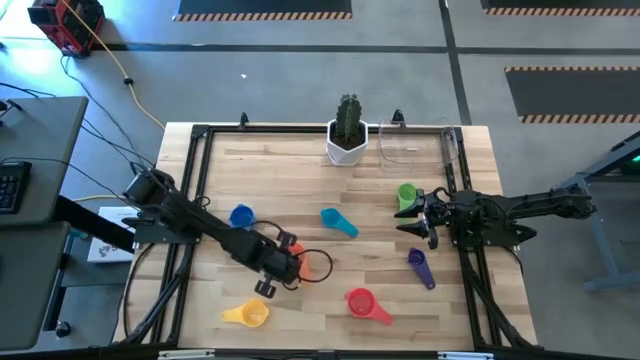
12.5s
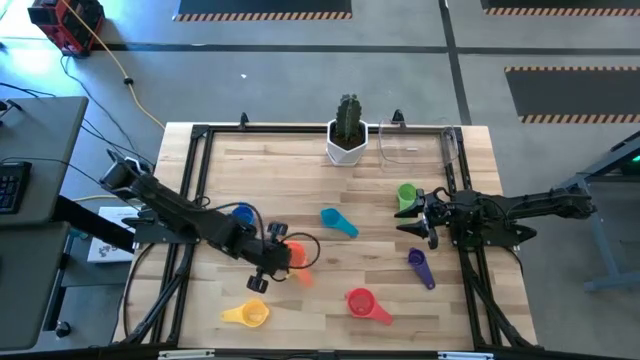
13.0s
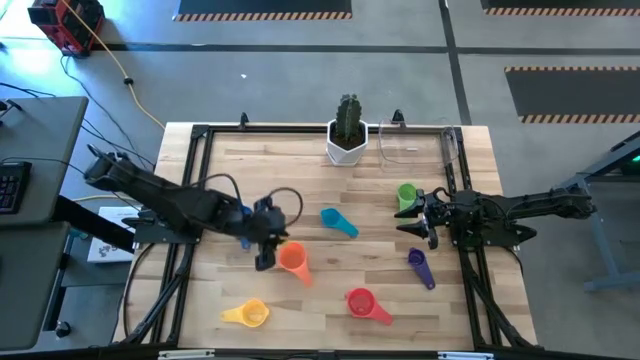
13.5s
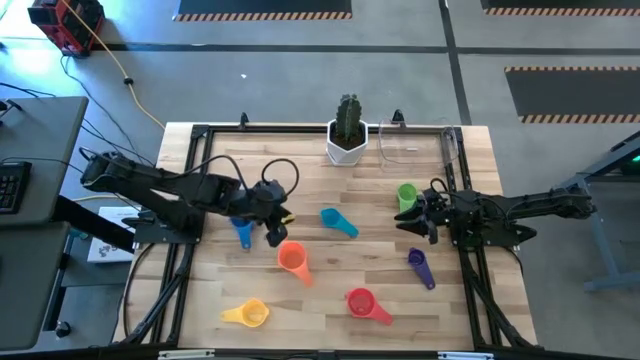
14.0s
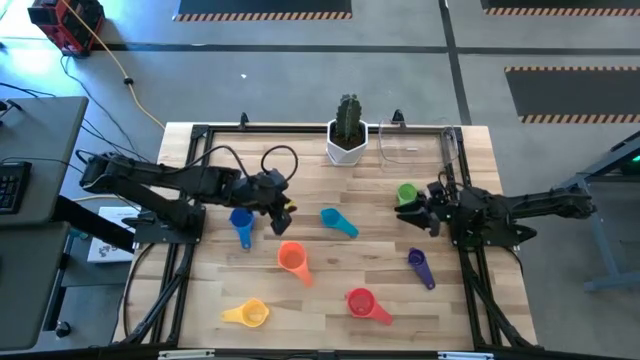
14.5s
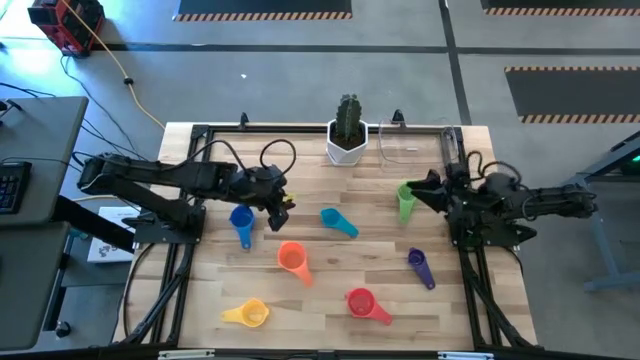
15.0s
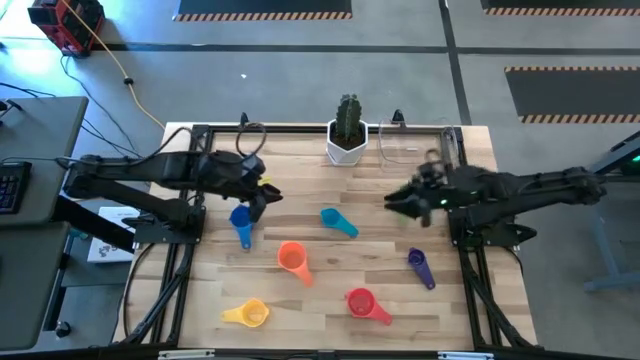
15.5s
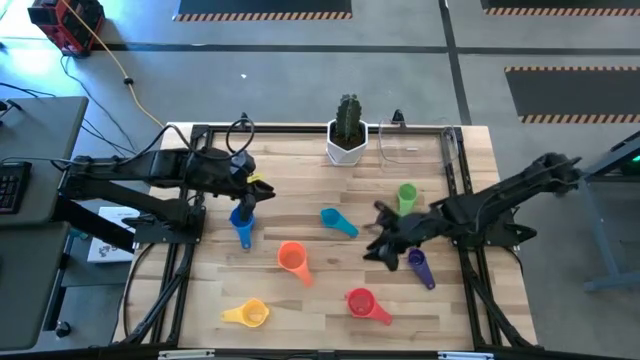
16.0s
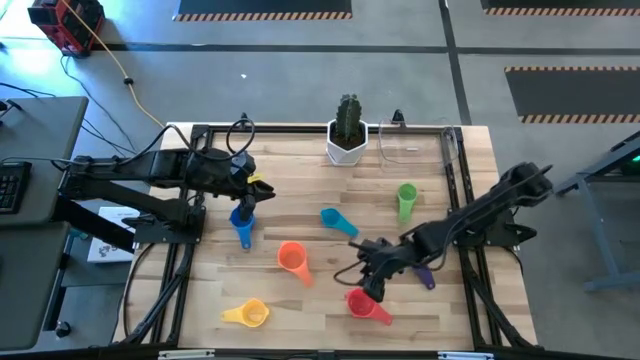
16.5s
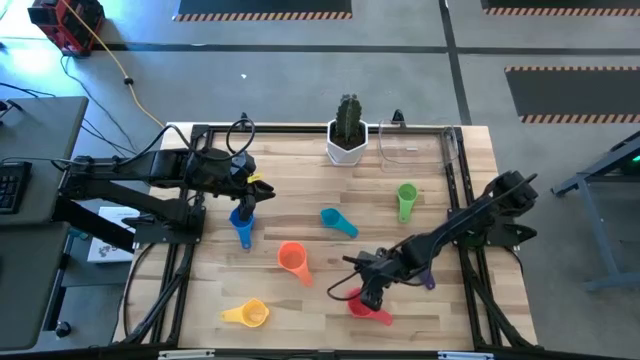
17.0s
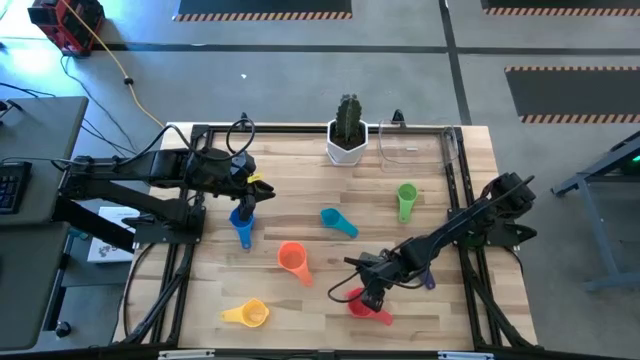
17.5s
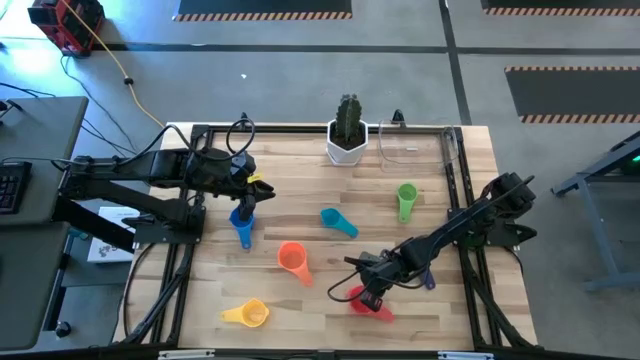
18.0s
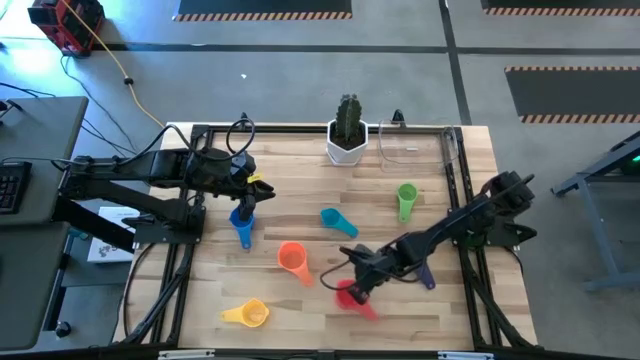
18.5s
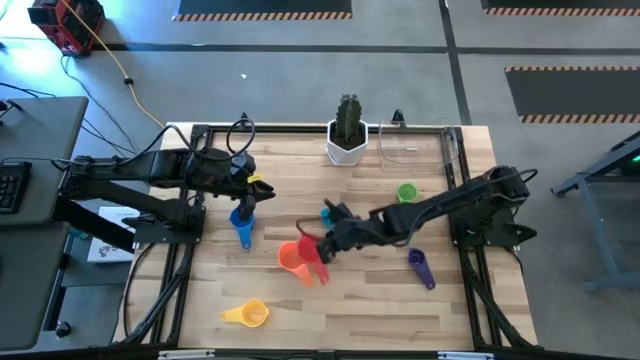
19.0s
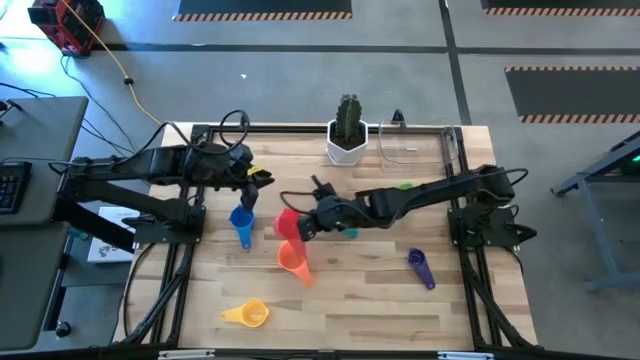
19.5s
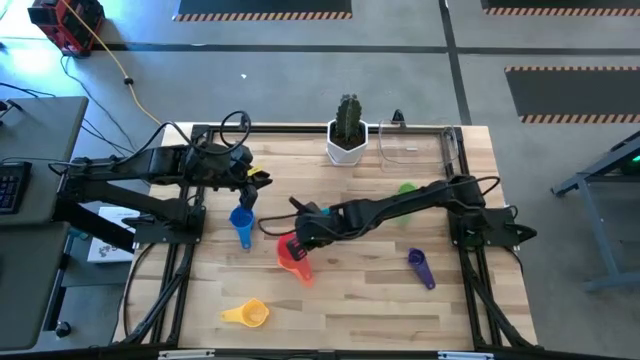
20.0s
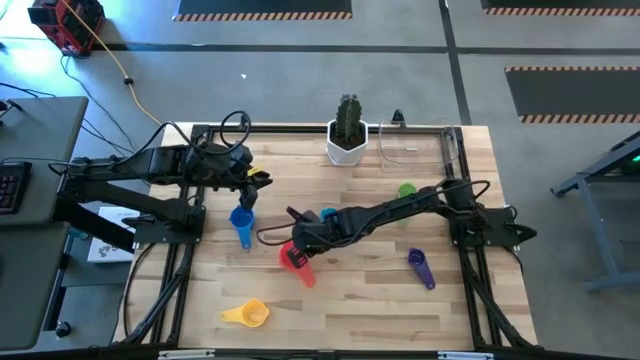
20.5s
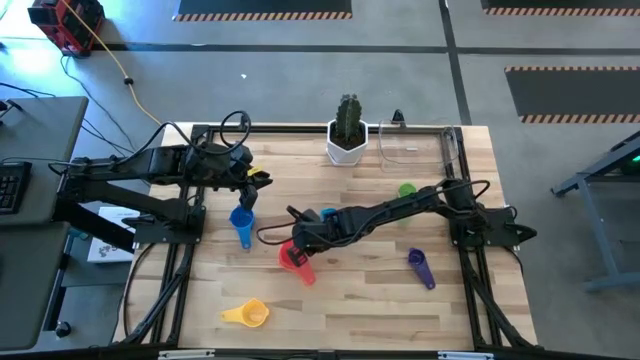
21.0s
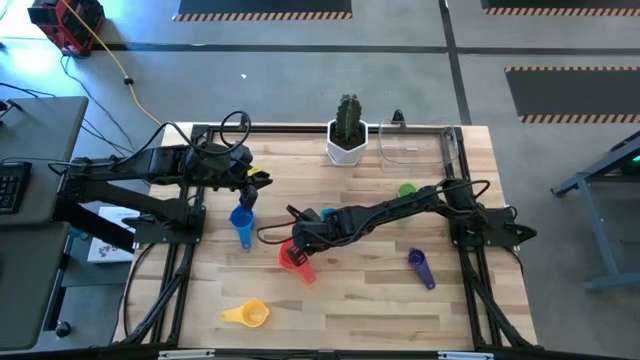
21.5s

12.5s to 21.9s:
Task: Nest measuring cups in basket
Put the light red measuring cup on top of the orange measuring cup

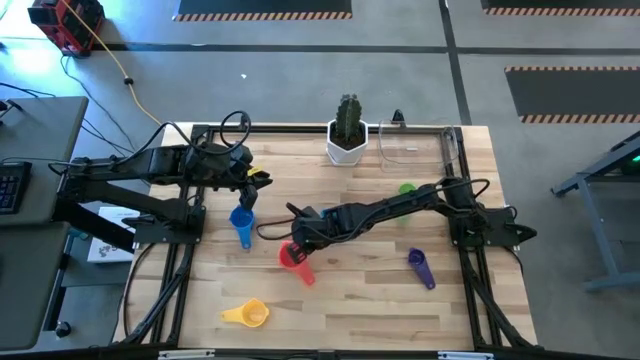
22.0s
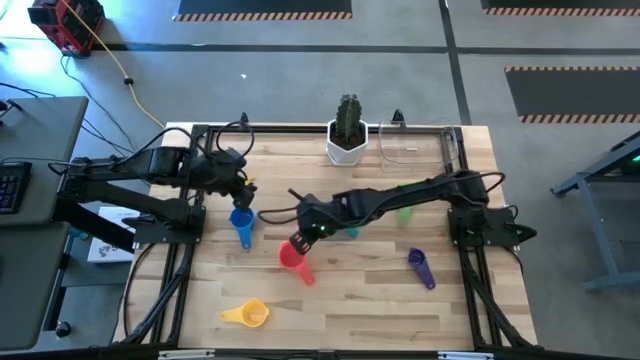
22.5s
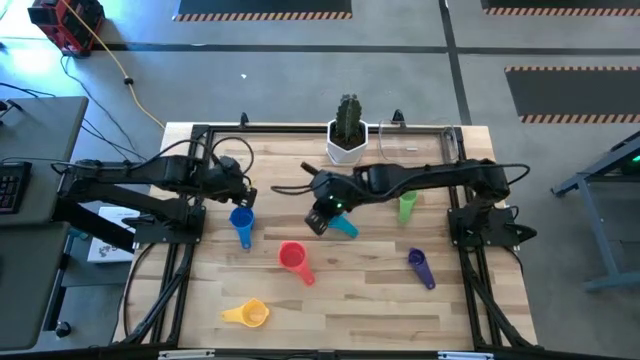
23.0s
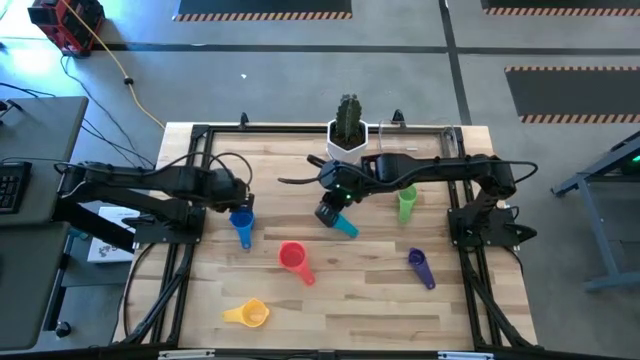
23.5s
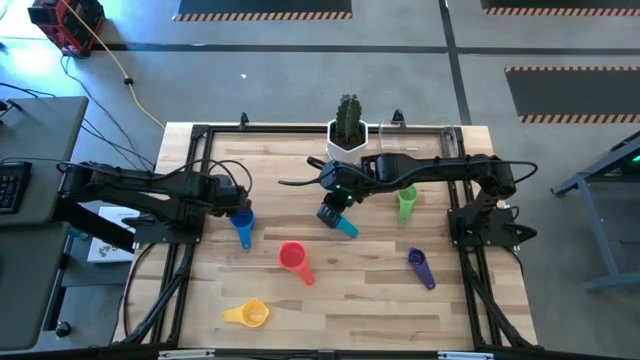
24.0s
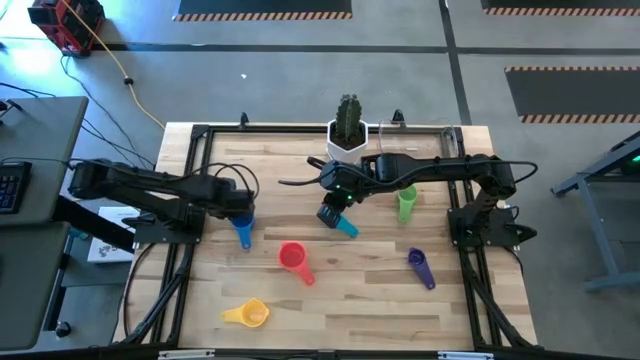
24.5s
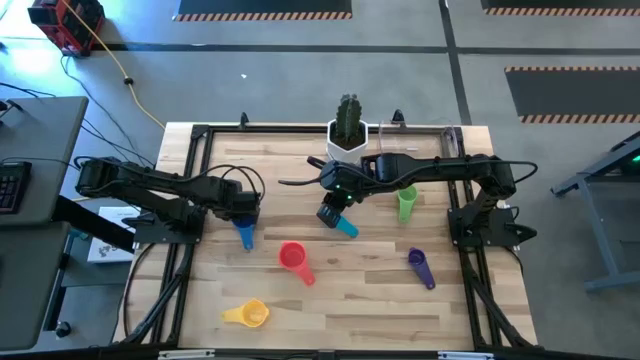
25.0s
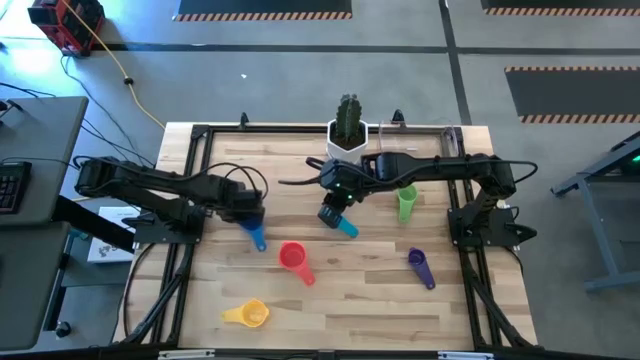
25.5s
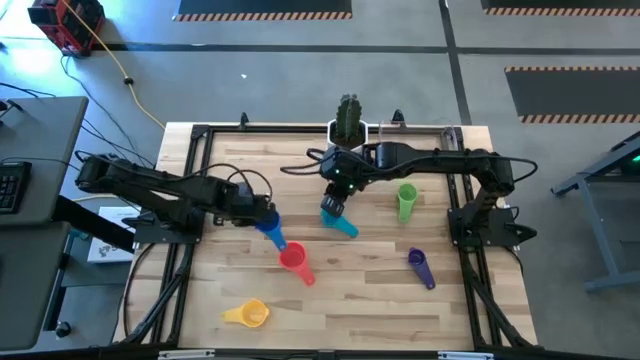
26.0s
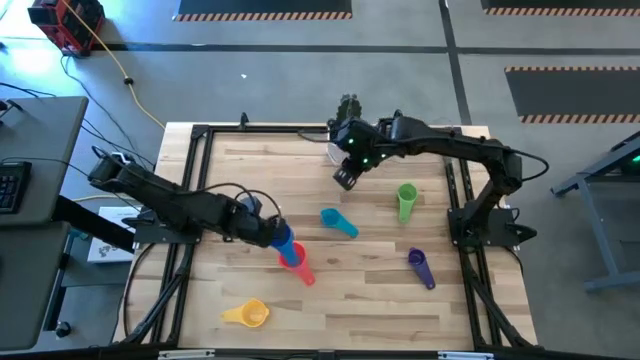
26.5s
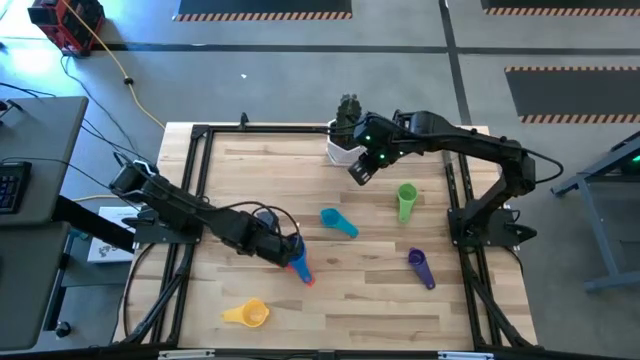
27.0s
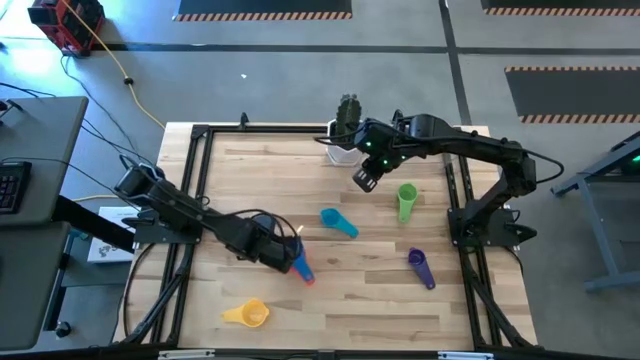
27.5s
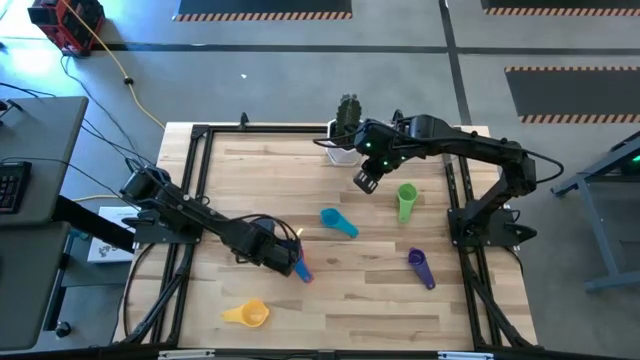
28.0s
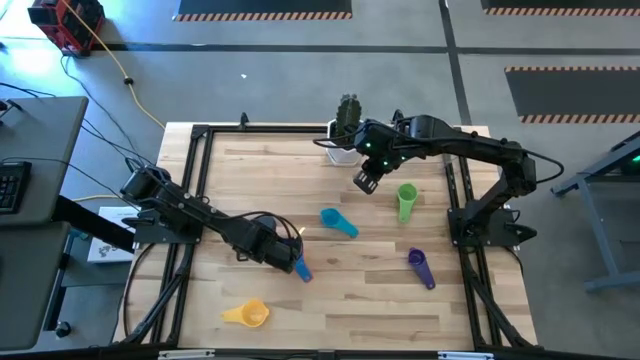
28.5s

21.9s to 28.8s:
Put the blue measuring cup on top of the light red measuring cup

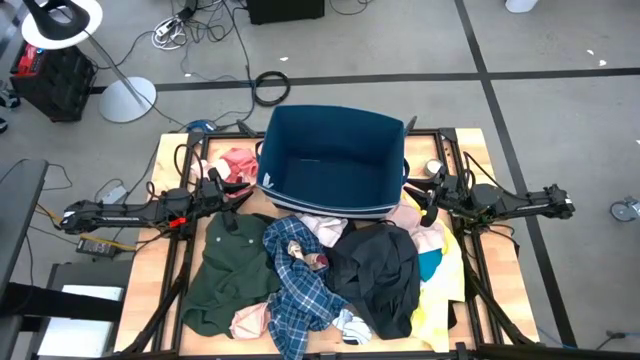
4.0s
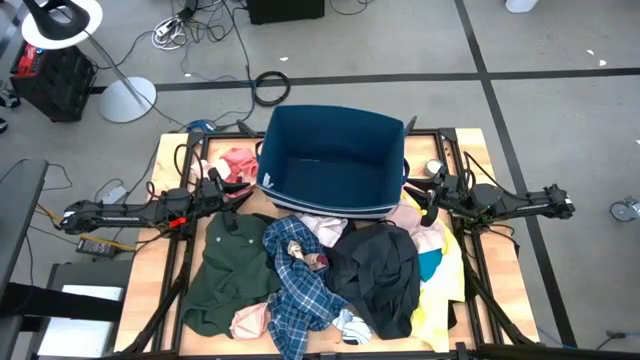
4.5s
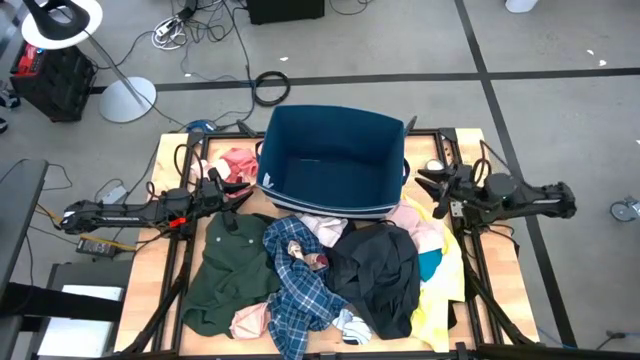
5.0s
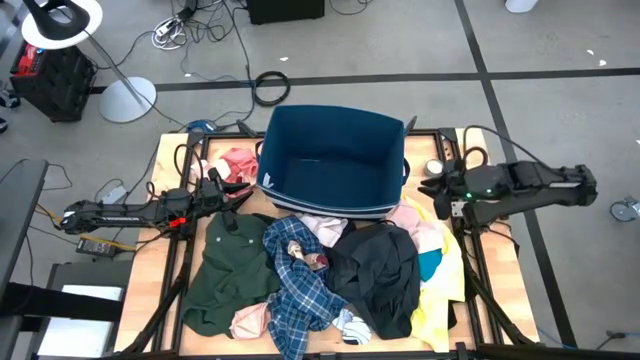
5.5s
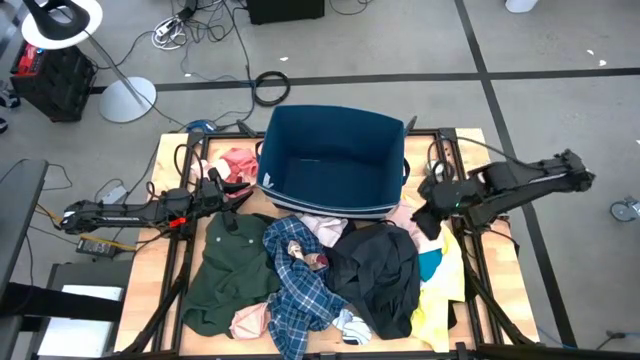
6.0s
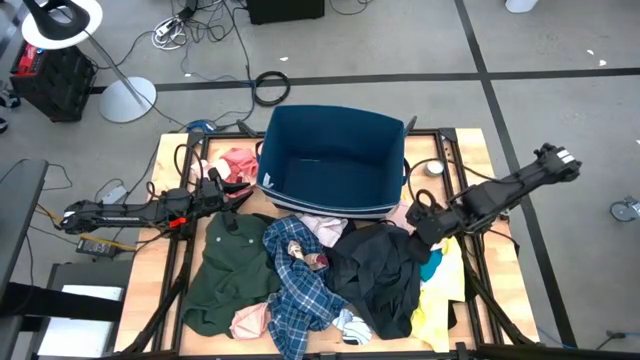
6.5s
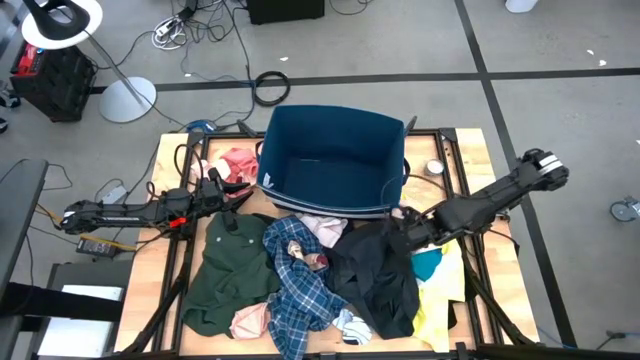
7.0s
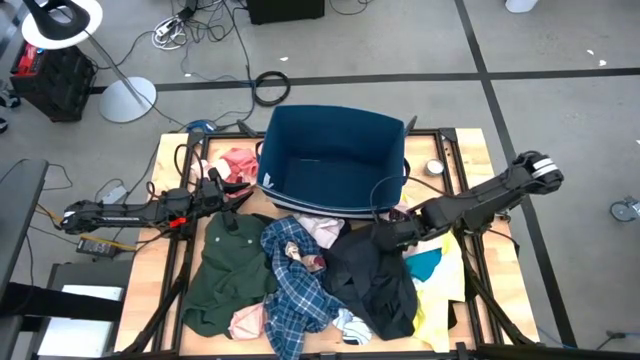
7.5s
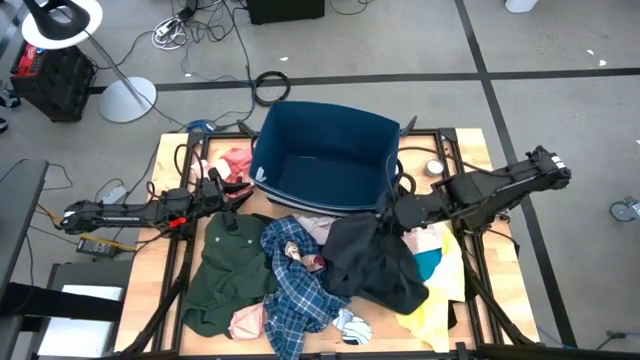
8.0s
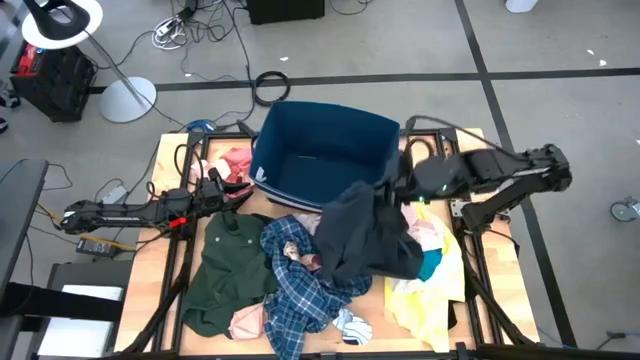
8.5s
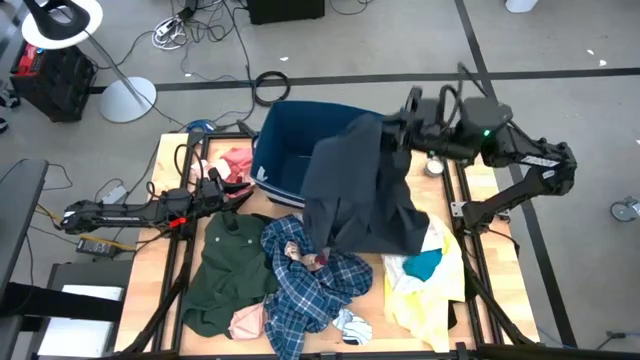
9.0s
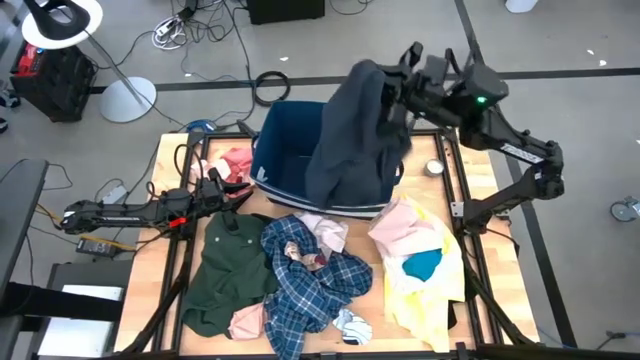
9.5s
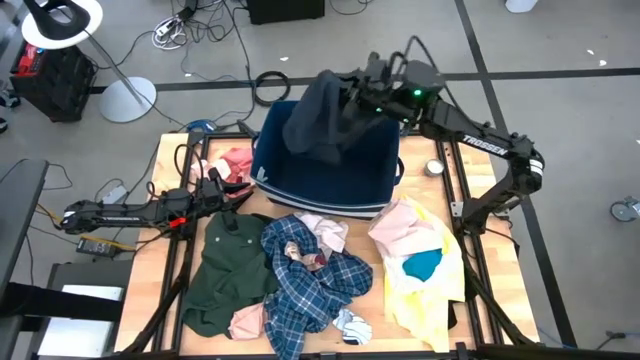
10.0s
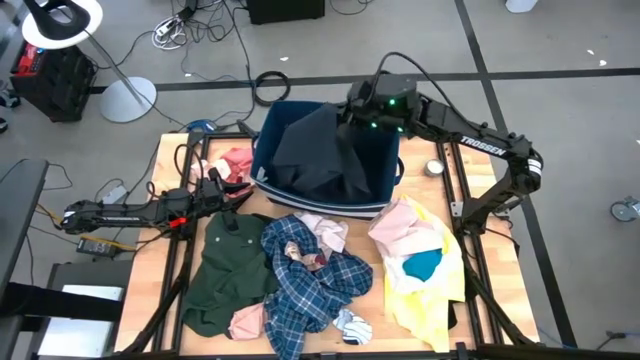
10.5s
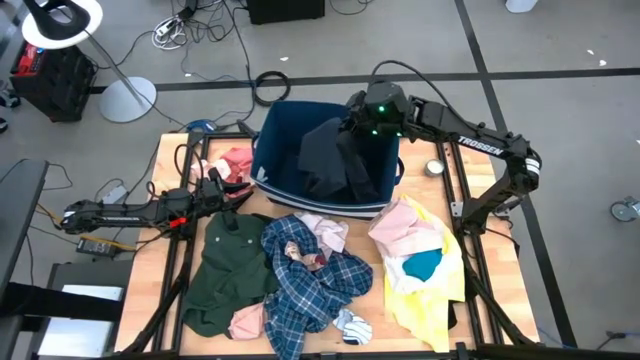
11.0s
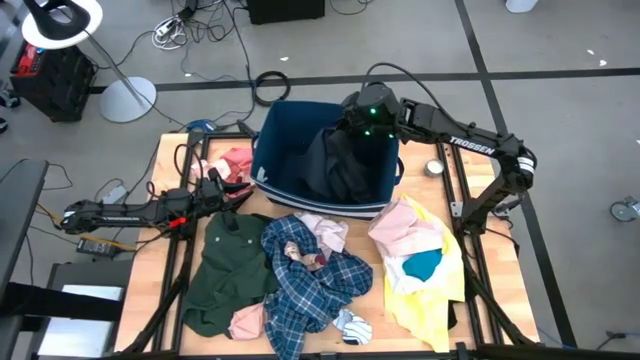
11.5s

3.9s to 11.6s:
Task: Sort clothes
Put the dark blue pants into the blue bin
